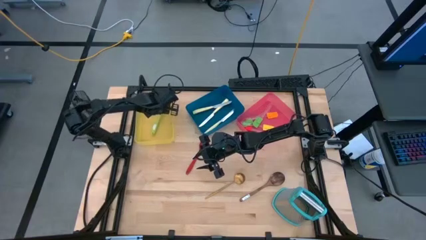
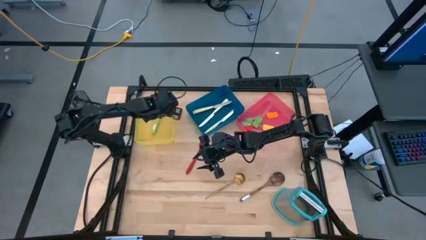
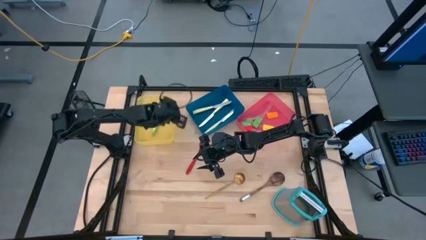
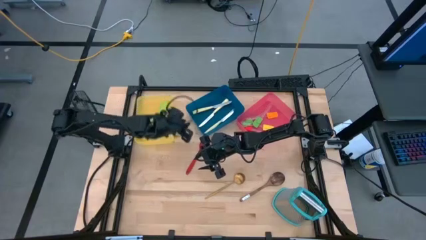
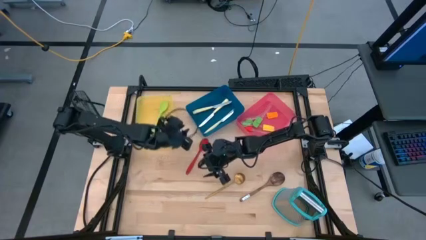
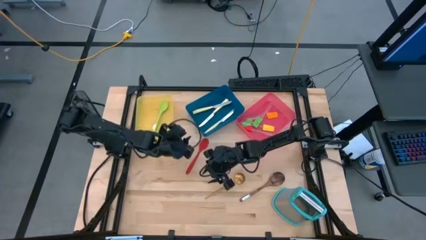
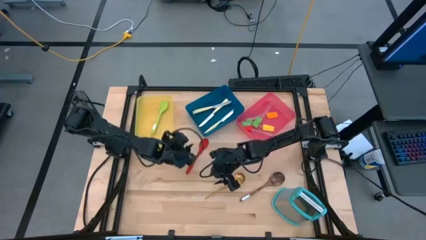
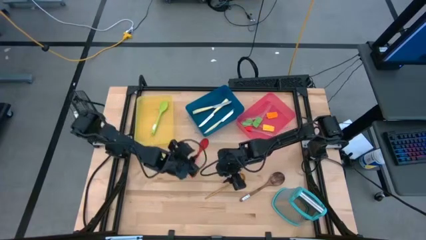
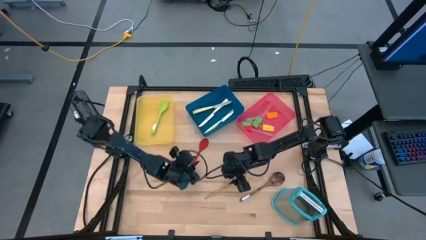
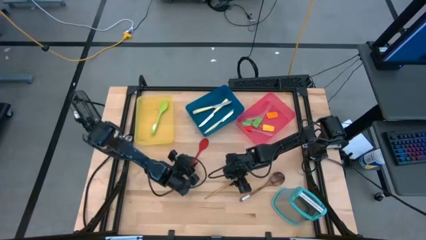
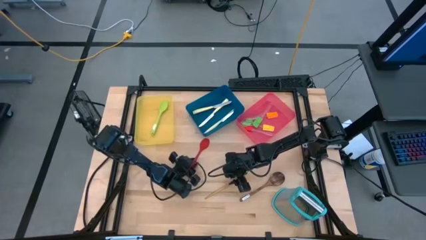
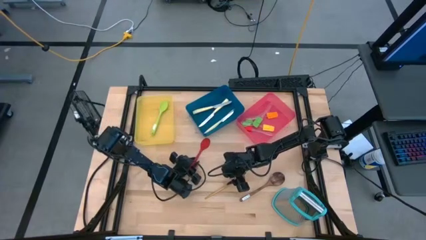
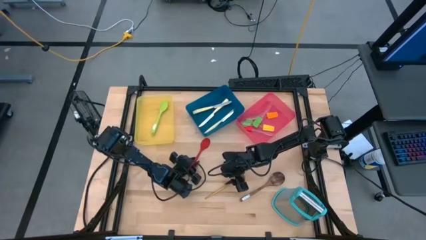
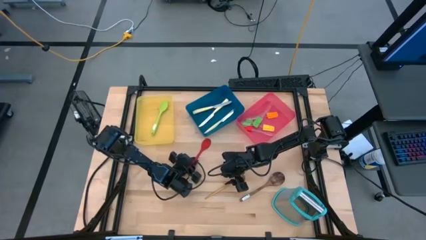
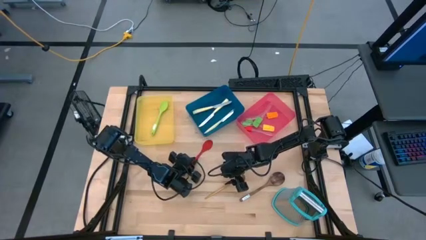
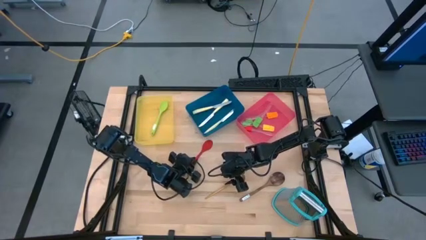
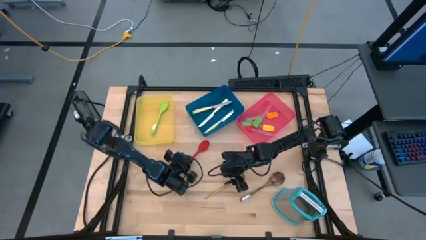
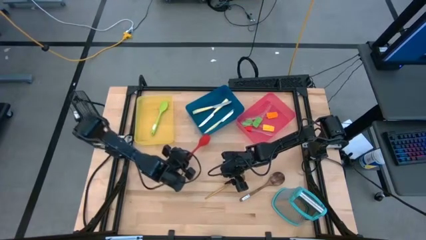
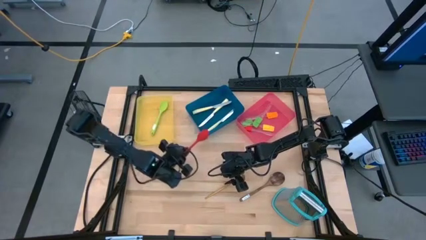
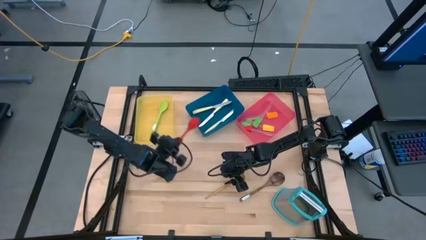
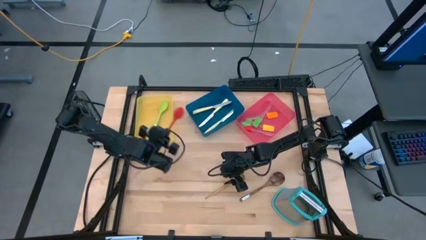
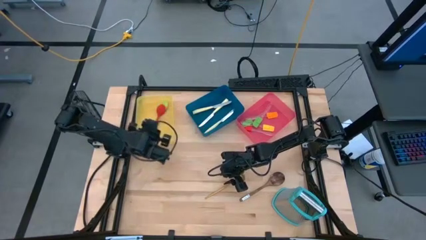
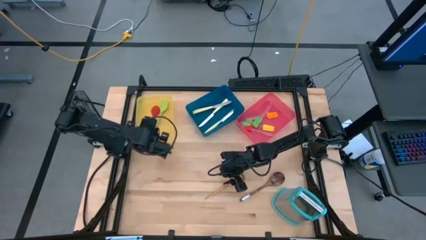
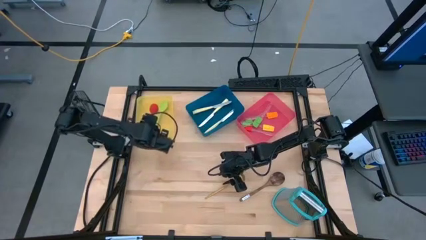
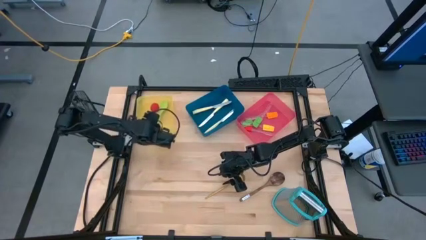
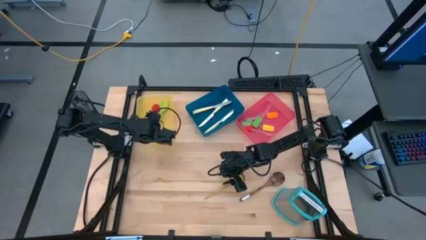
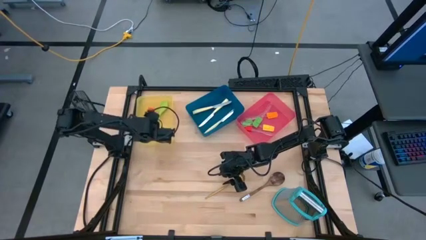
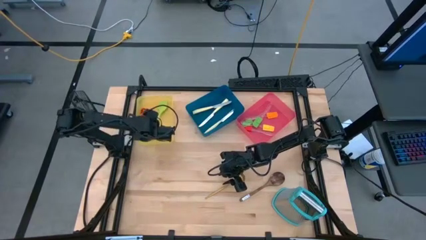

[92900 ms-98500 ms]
Task: Pick & Place Kitchen Items
Put the red spoon into the yellow bin

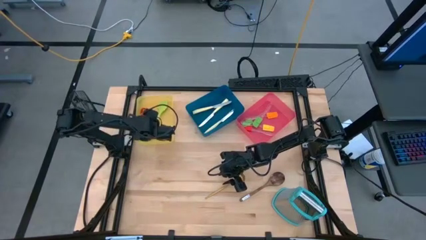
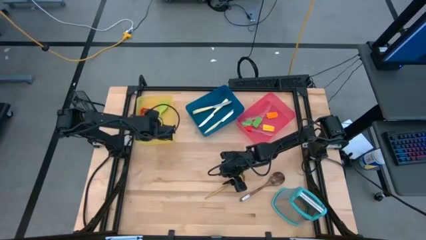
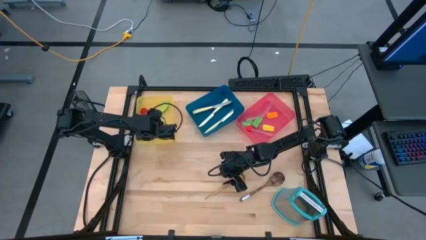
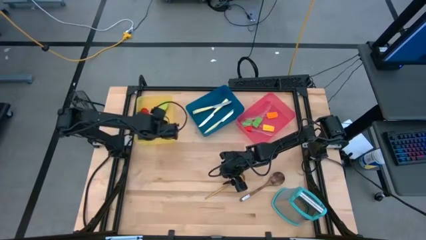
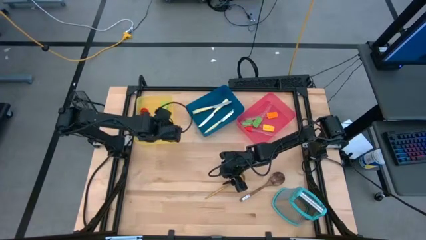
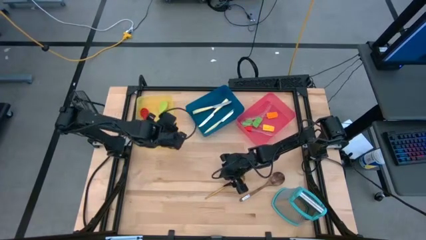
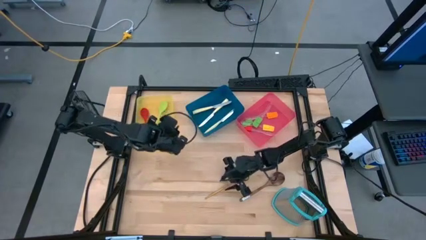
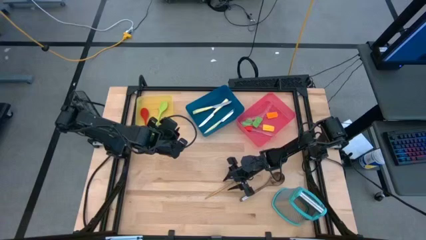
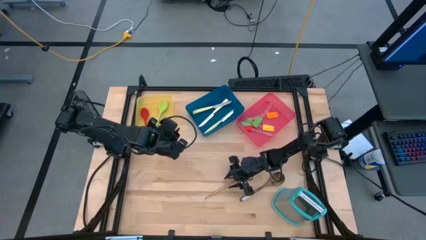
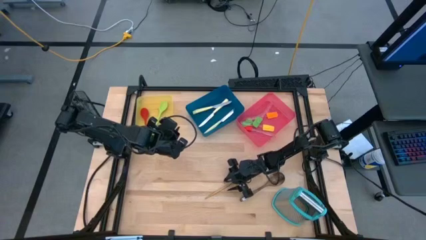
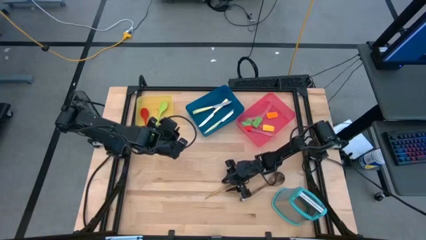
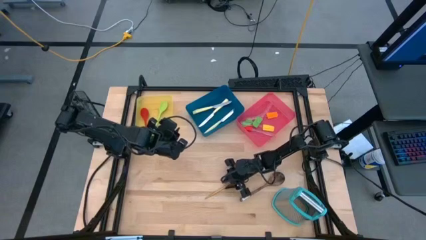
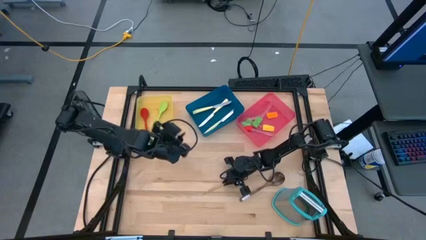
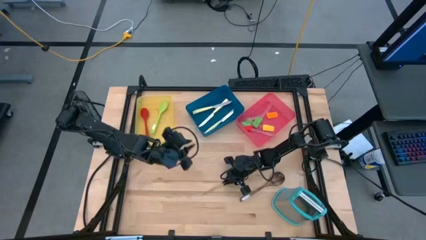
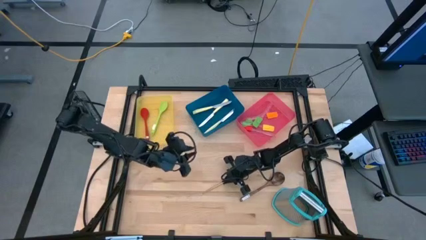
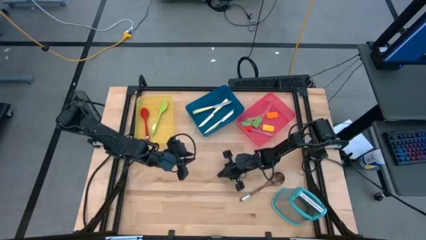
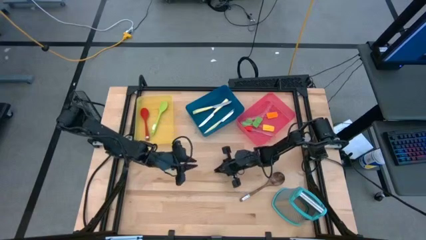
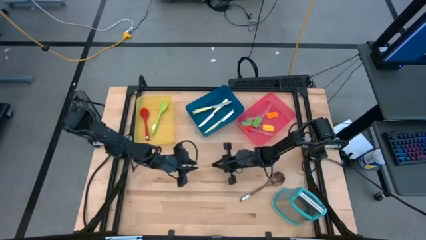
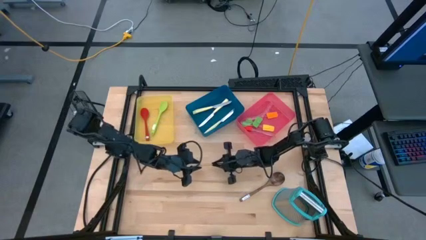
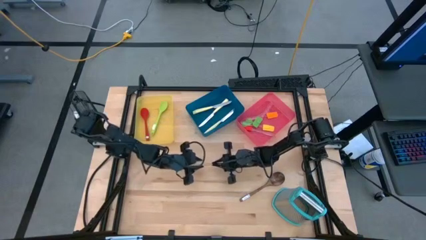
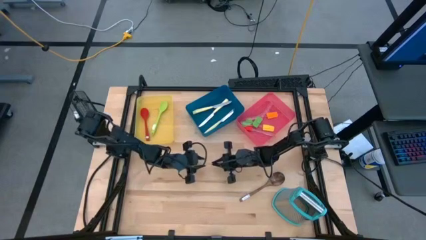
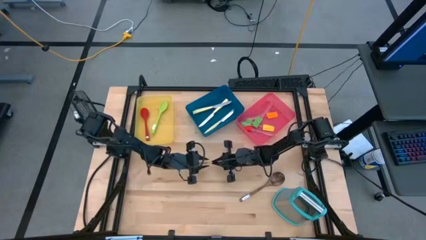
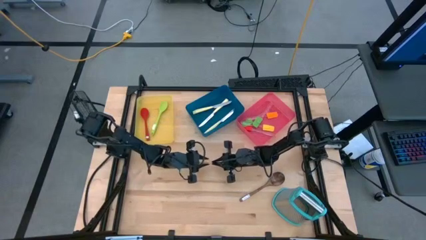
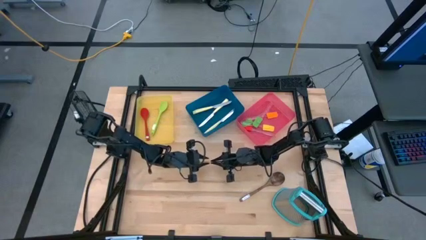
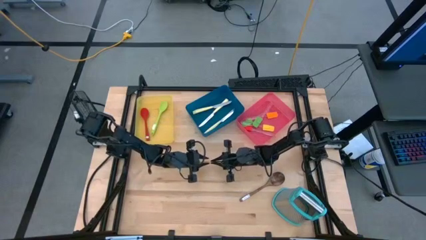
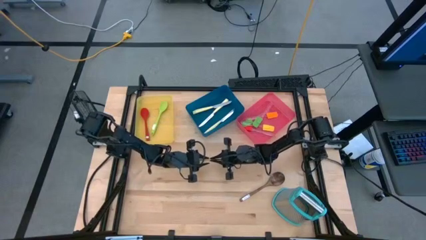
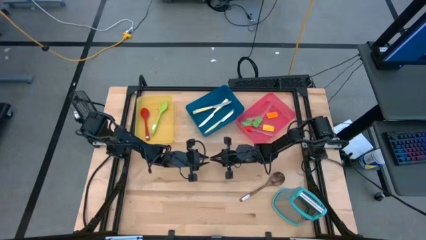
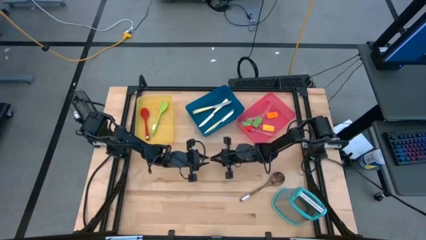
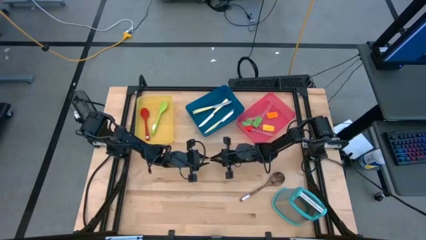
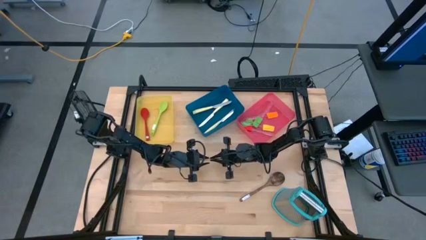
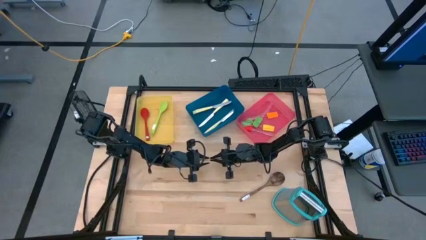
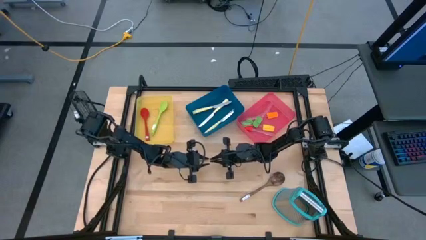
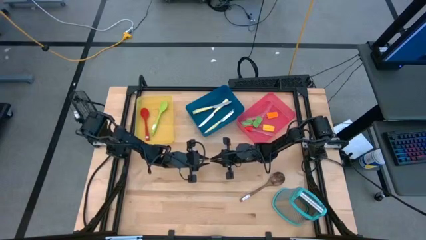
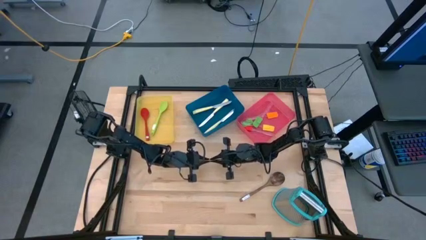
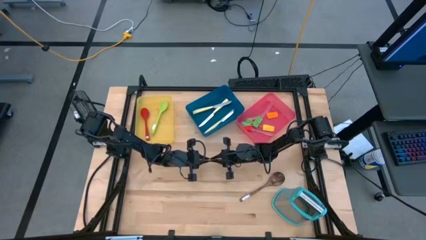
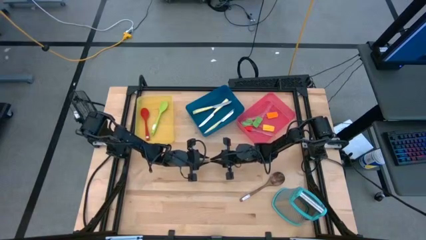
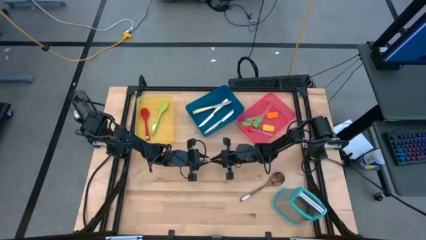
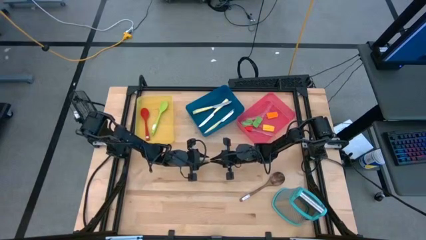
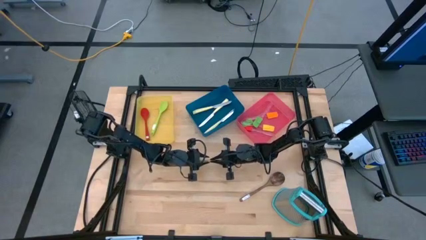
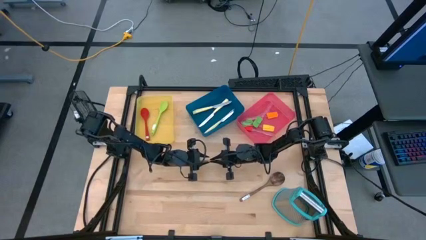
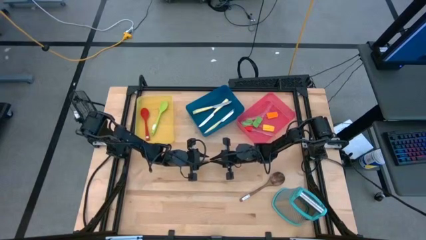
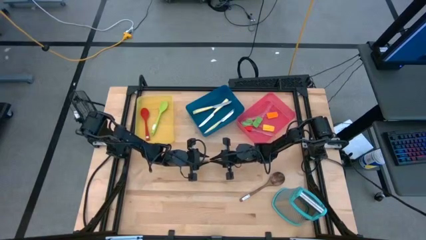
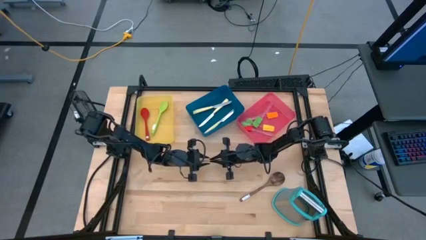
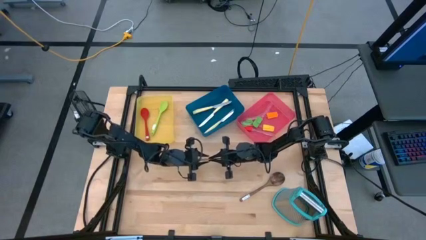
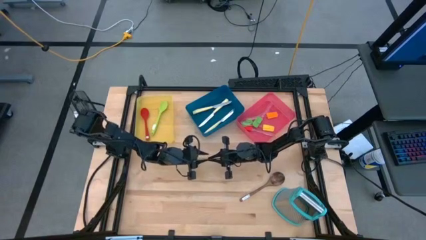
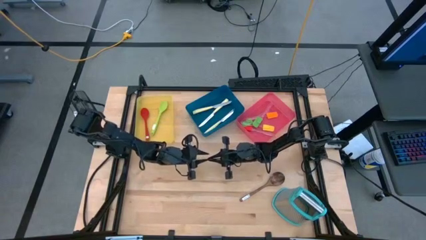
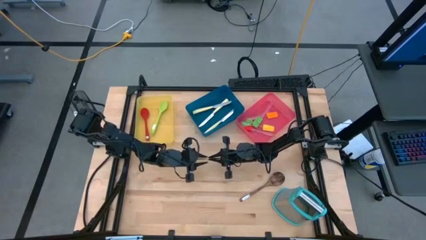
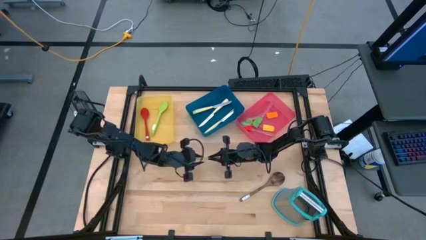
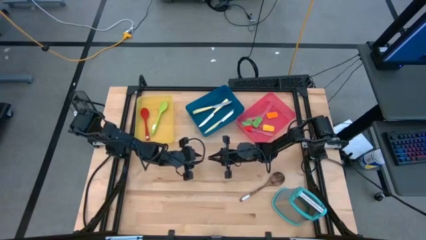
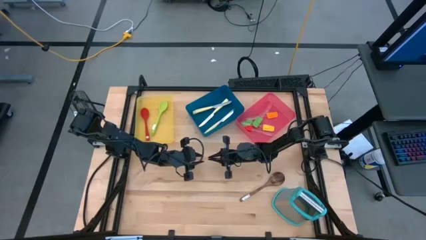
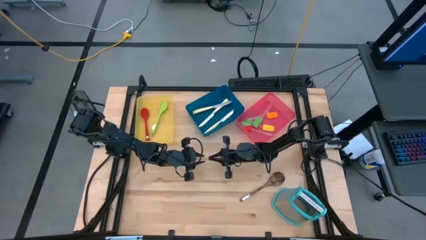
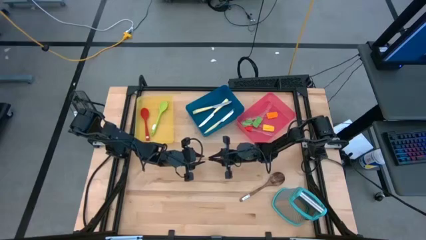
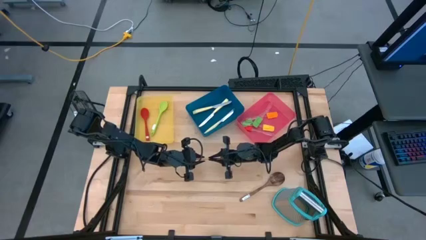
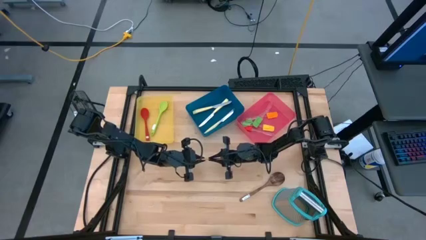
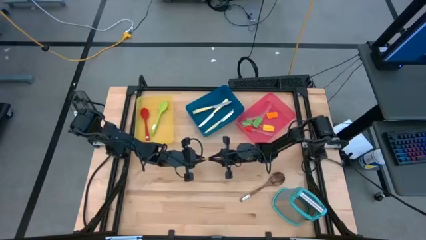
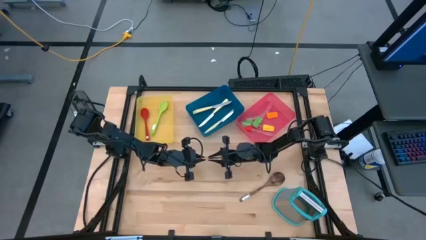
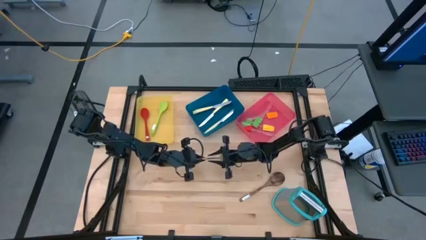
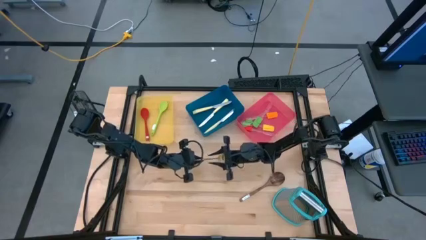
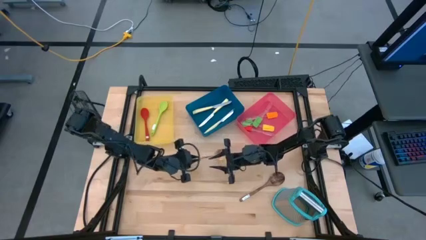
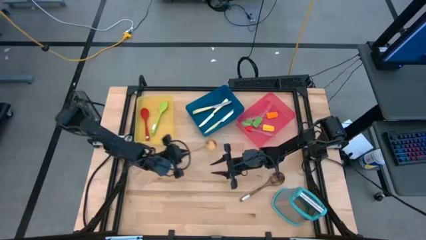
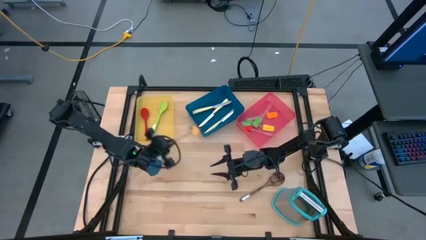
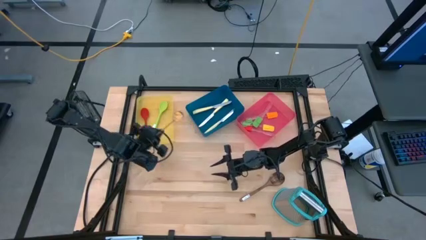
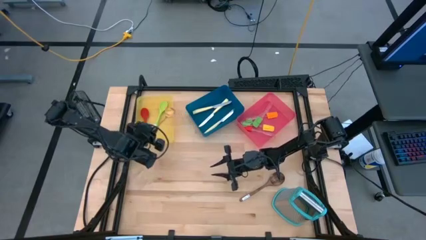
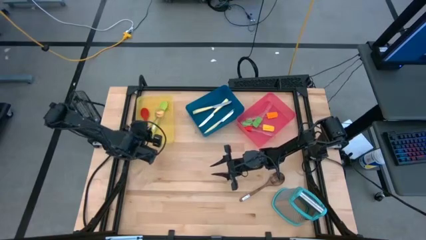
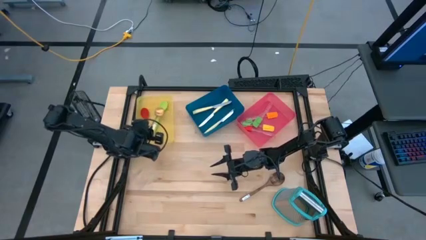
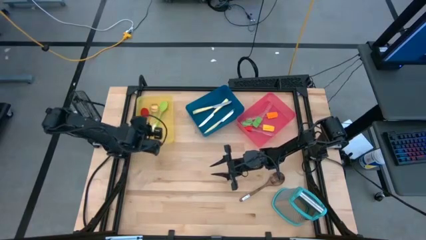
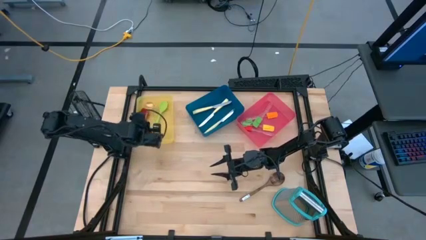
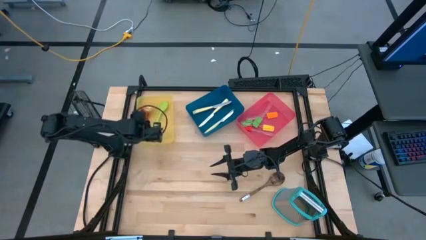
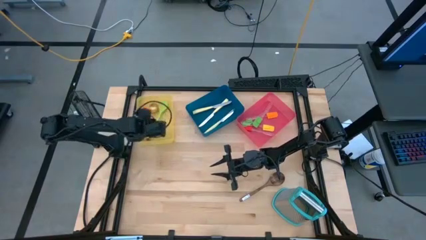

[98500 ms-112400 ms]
Put the gold spoon into the yellow bin
